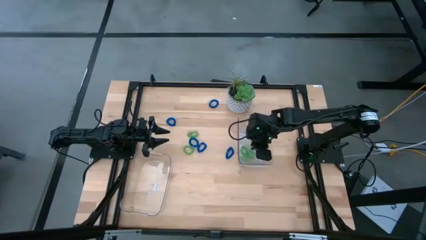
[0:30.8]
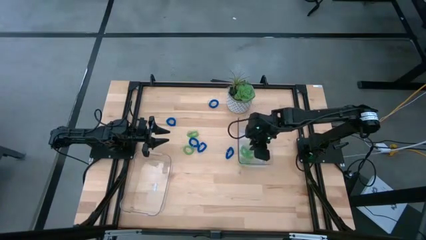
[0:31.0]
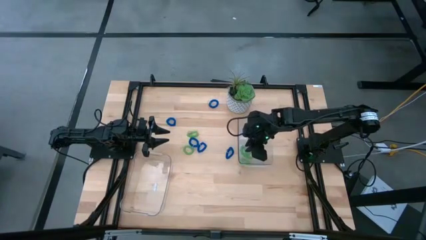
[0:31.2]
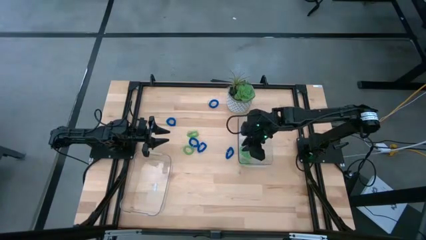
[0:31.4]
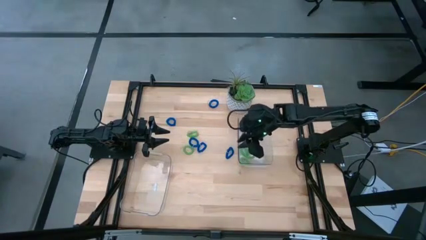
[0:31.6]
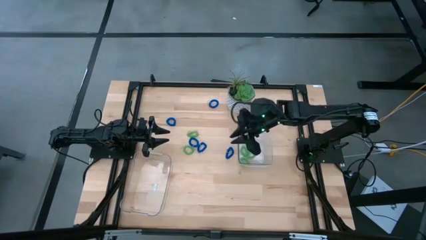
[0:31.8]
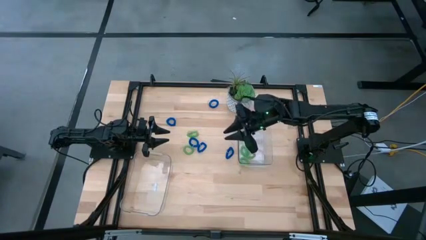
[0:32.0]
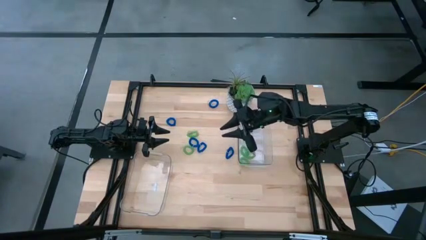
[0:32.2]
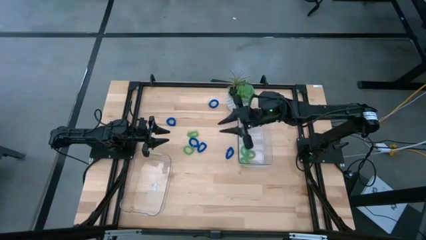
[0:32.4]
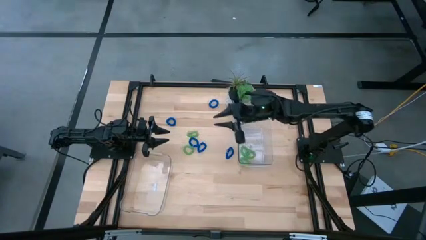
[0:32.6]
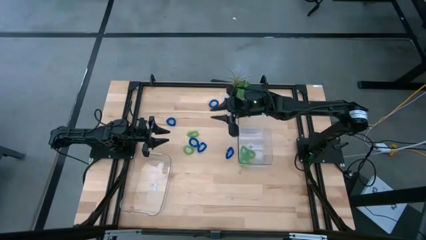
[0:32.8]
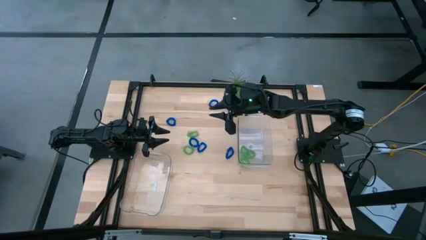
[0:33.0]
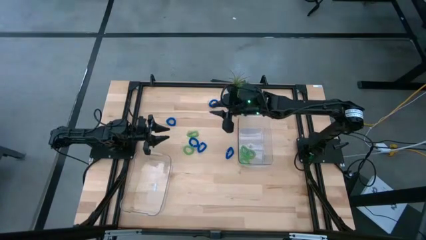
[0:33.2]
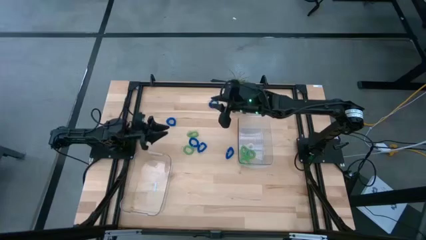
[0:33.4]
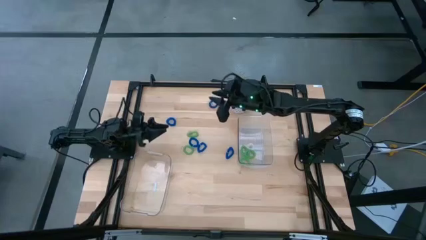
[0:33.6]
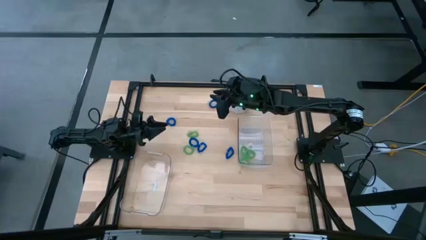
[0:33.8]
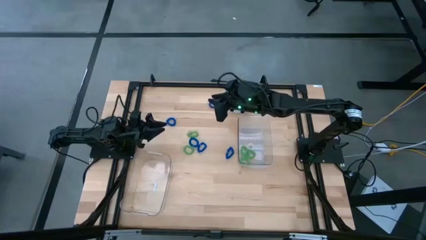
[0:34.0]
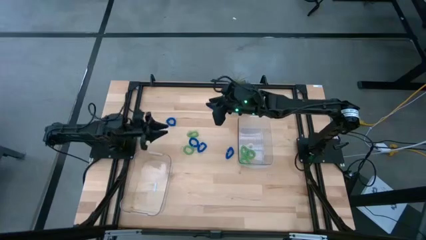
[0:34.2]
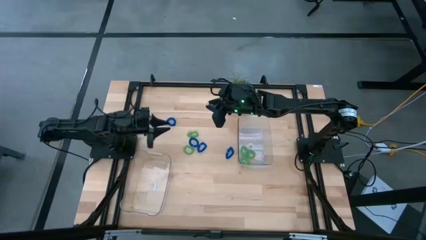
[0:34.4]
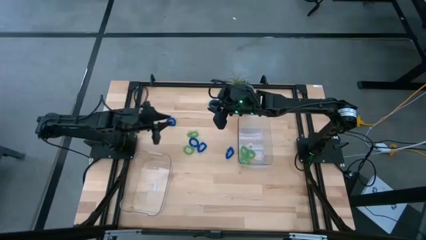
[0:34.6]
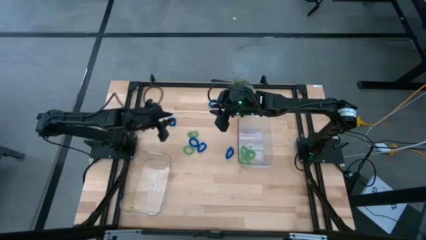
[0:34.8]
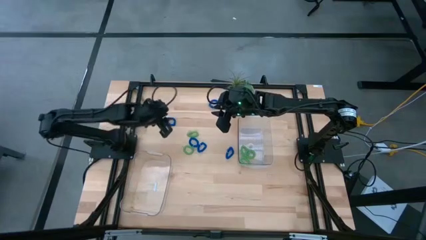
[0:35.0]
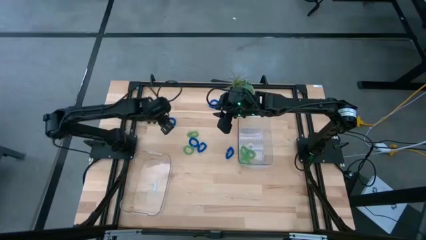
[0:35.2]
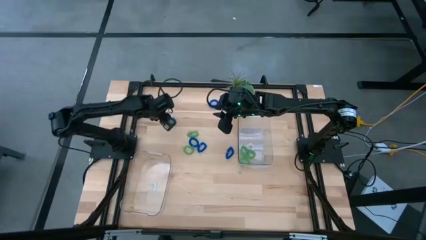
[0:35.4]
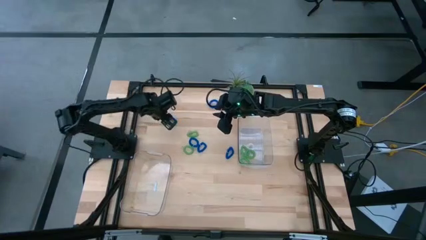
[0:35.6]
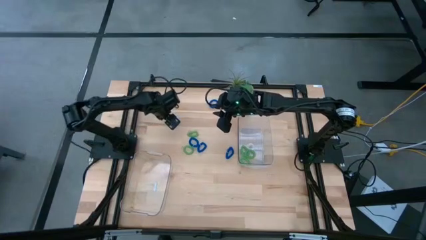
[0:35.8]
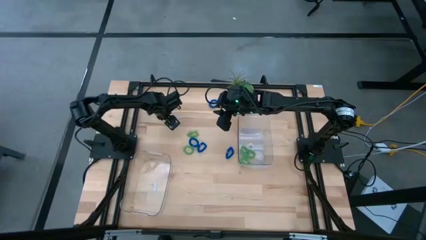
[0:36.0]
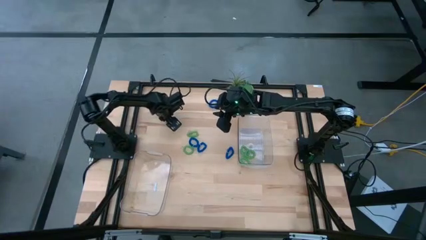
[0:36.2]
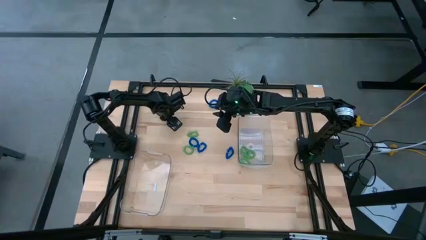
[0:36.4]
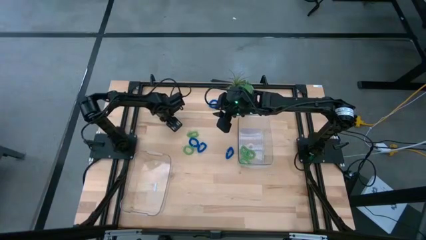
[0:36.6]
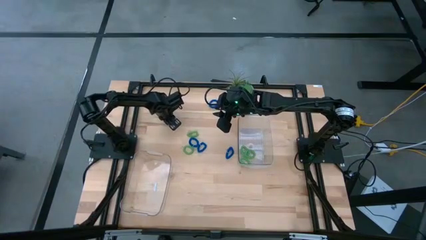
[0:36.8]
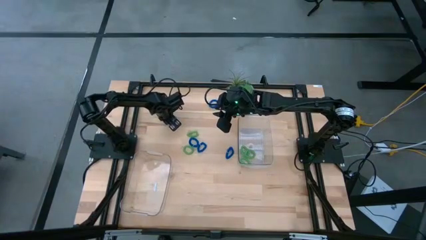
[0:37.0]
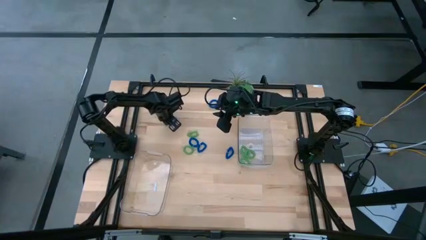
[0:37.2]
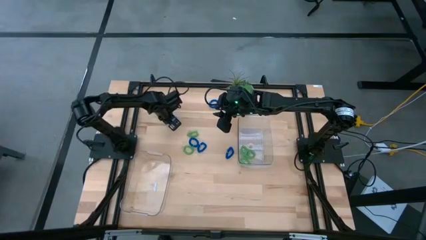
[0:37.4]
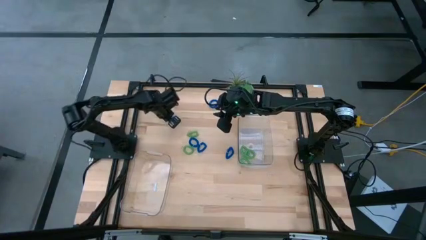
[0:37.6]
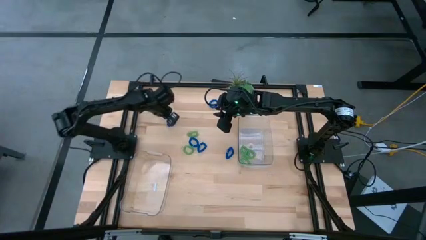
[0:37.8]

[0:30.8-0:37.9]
Task: Sort spring keychains
Put the blue spring keychain into the bottom transparent bin

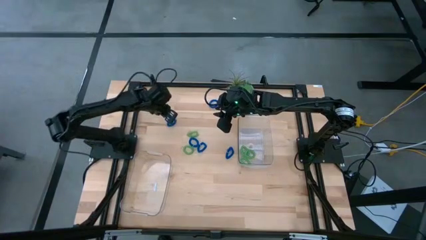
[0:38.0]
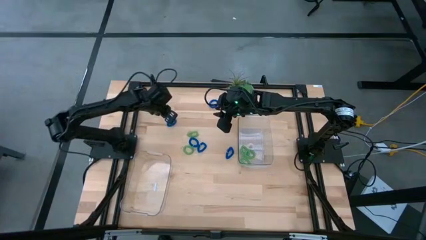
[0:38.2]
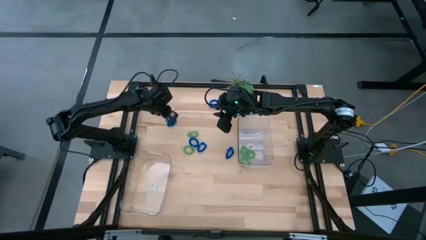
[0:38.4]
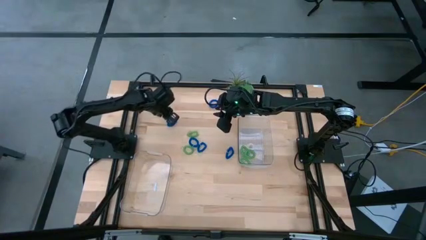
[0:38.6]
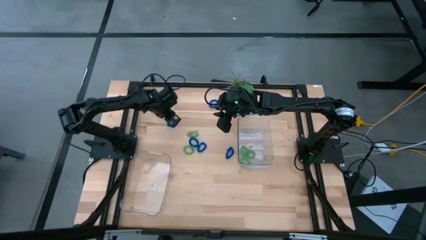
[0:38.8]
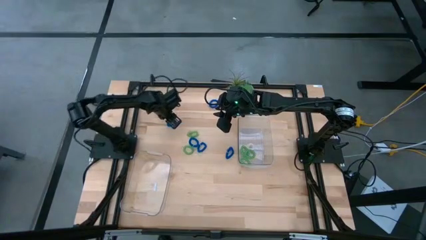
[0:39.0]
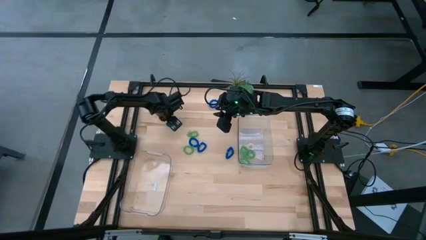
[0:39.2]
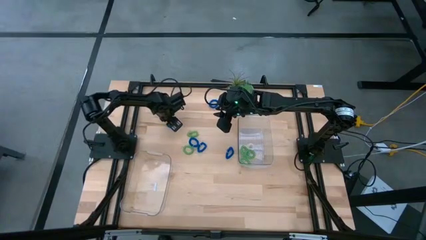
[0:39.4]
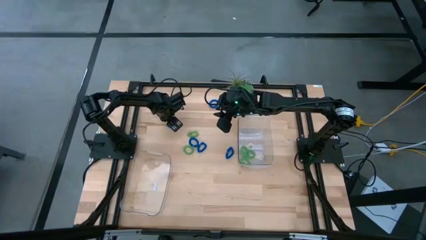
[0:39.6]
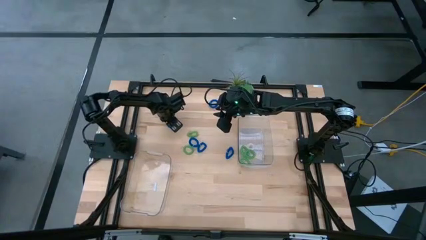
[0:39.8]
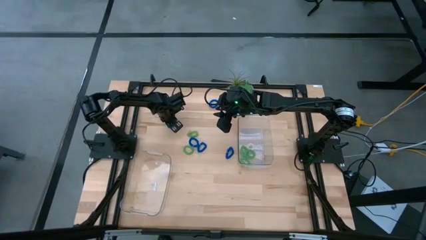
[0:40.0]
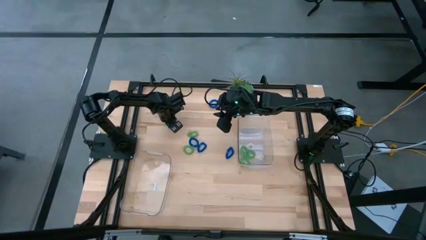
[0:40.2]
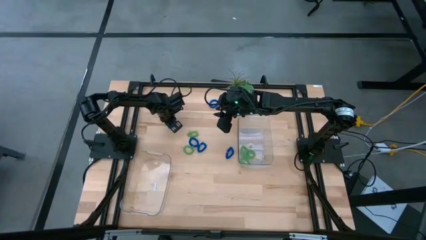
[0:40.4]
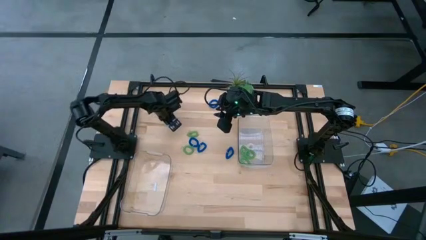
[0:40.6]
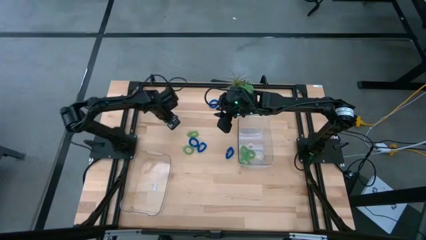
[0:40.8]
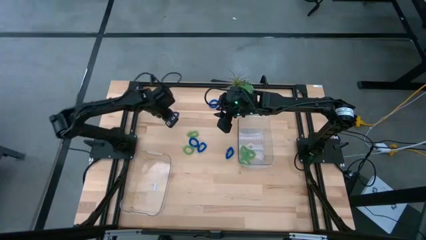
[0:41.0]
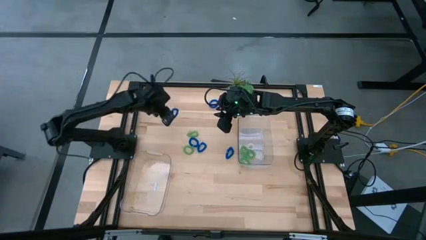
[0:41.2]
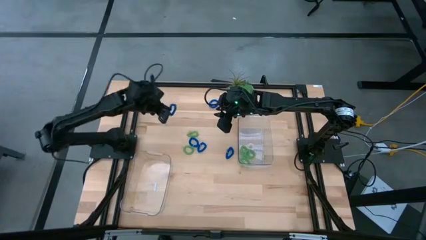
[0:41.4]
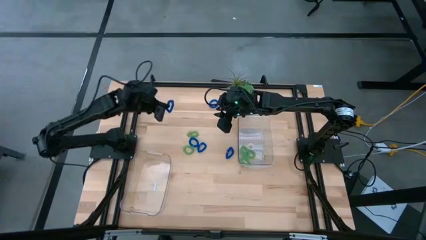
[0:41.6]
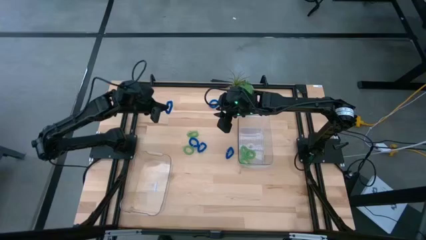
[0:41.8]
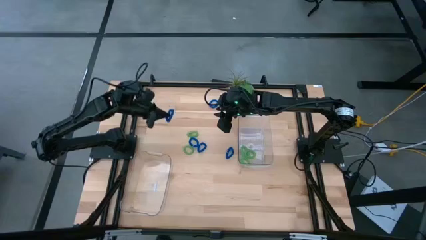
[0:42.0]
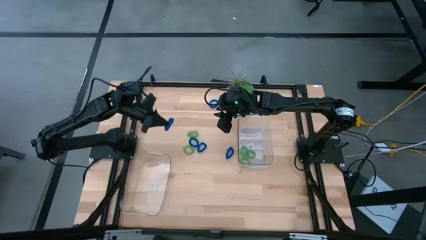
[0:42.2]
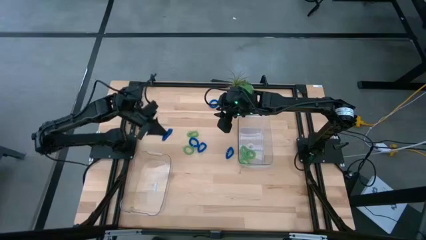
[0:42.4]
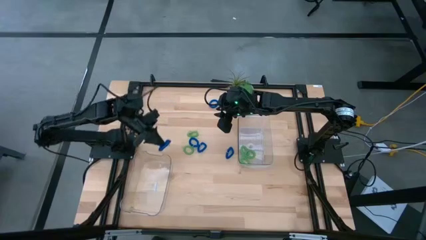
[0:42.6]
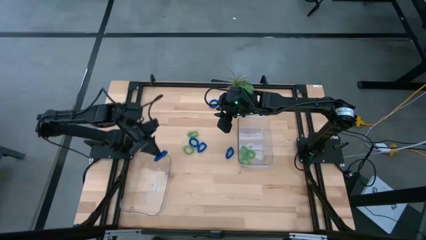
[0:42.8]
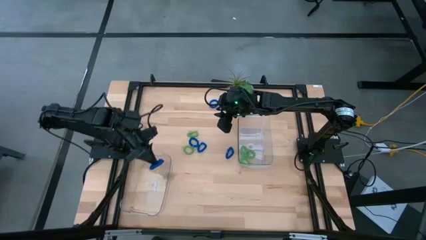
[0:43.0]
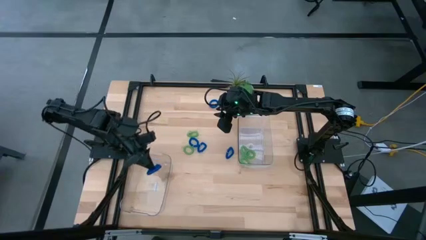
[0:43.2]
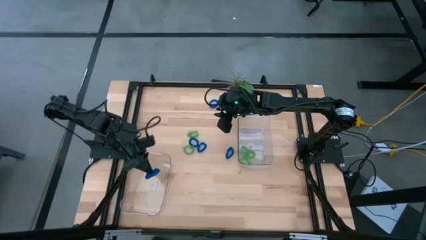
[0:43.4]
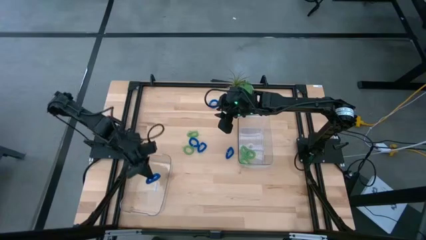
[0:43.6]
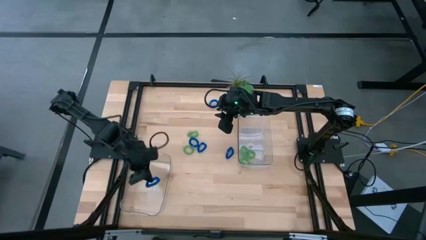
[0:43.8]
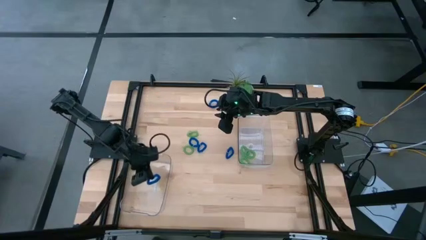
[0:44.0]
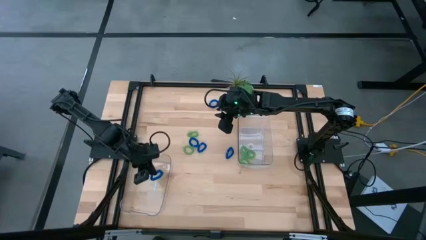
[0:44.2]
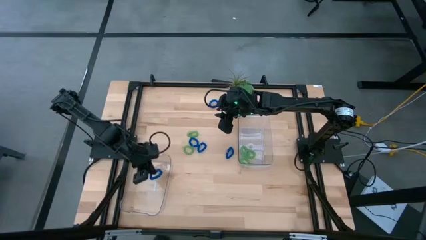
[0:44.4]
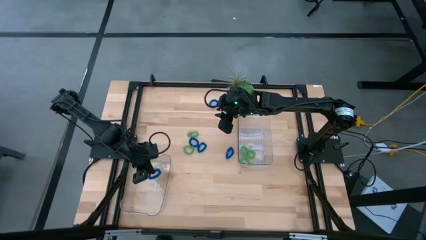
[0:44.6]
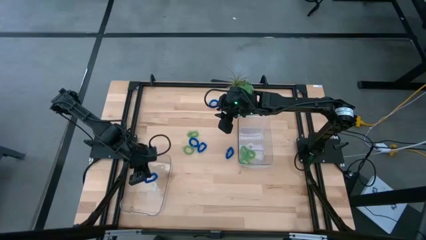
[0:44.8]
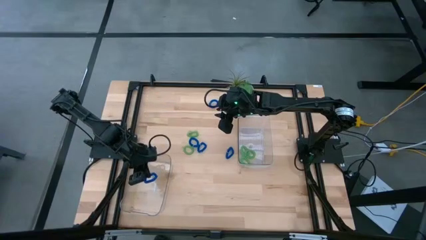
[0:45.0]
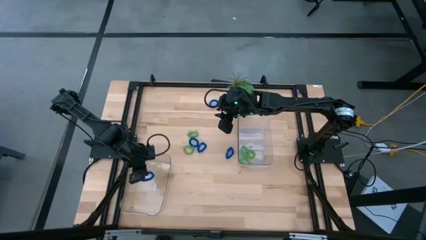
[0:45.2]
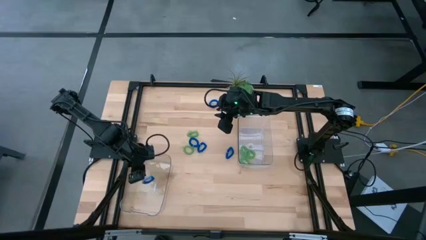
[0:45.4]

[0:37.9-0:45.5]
Put the blue spring keychain into the bottom transparent bin
